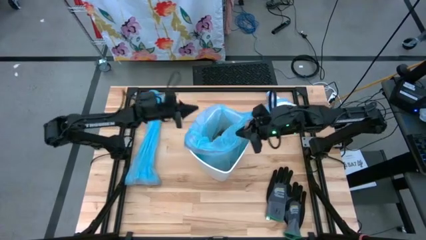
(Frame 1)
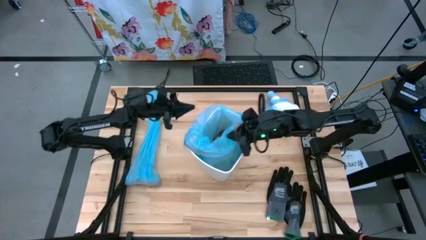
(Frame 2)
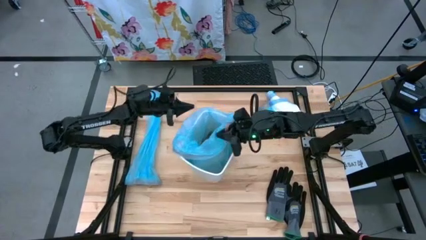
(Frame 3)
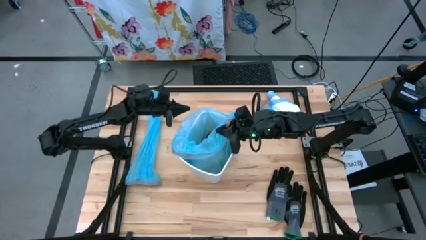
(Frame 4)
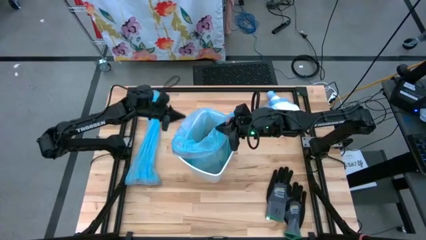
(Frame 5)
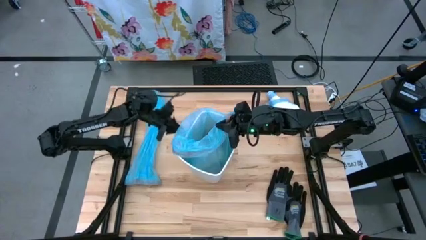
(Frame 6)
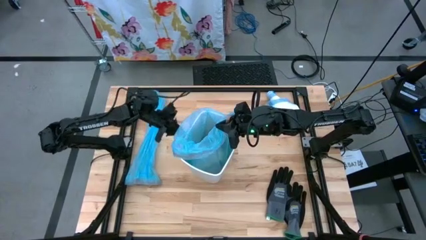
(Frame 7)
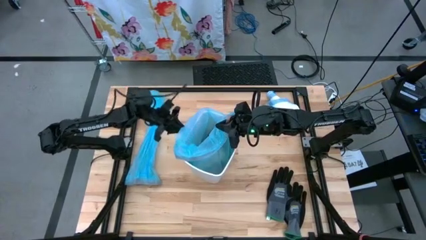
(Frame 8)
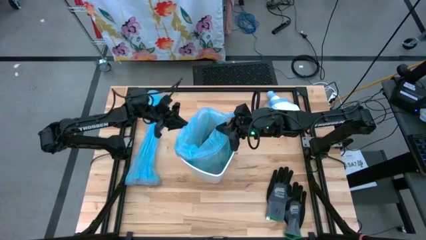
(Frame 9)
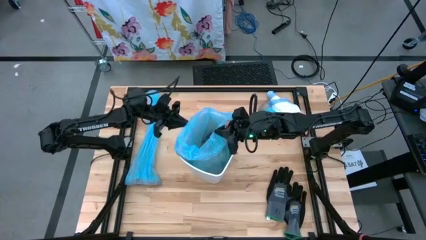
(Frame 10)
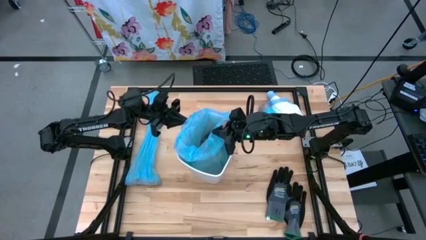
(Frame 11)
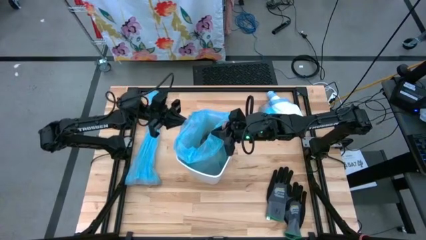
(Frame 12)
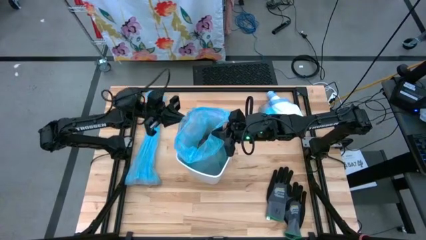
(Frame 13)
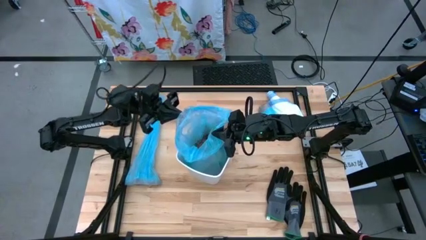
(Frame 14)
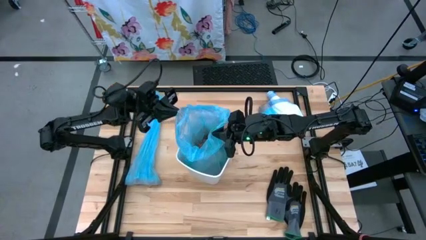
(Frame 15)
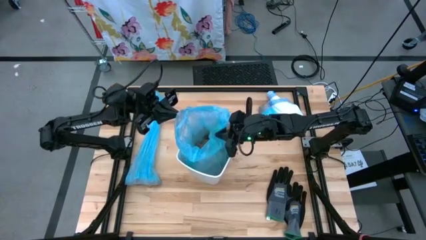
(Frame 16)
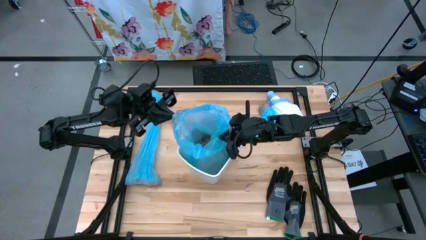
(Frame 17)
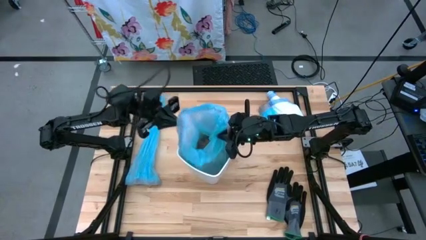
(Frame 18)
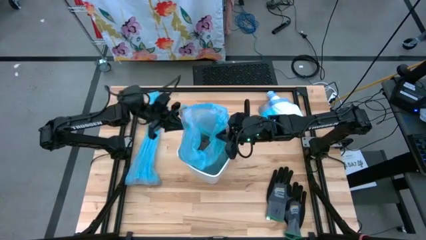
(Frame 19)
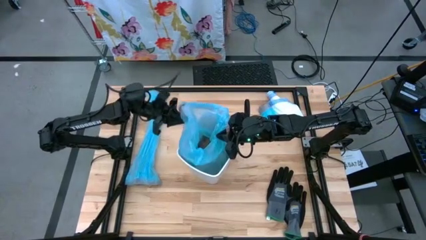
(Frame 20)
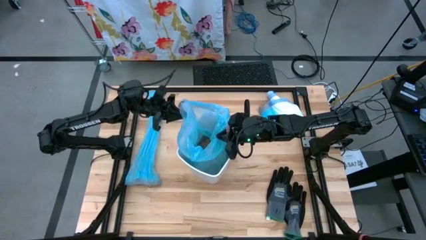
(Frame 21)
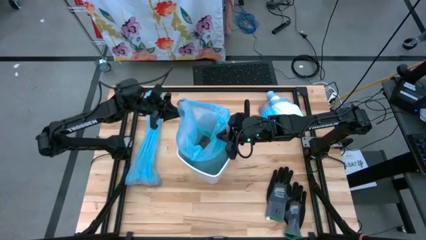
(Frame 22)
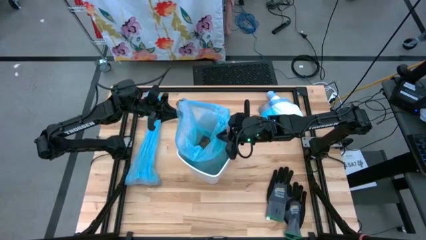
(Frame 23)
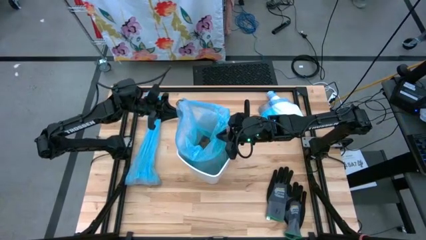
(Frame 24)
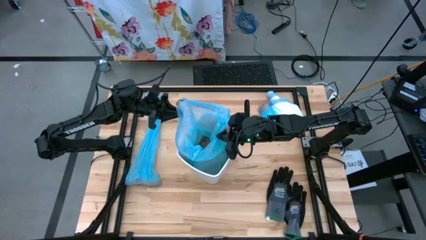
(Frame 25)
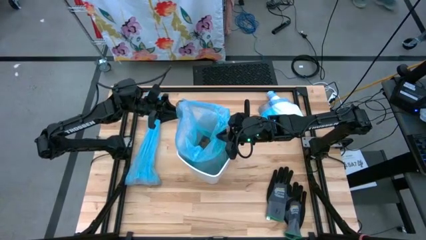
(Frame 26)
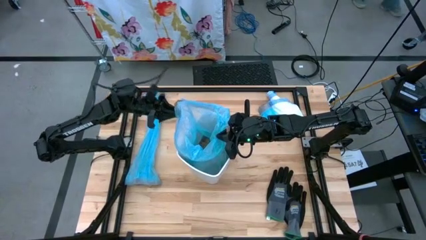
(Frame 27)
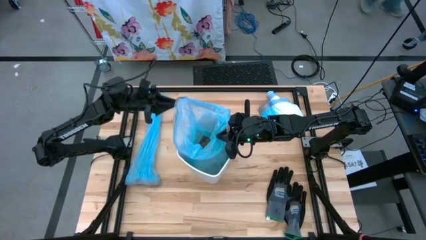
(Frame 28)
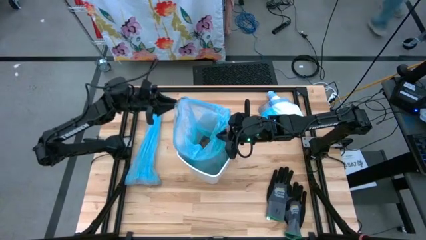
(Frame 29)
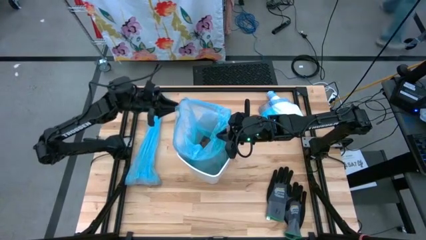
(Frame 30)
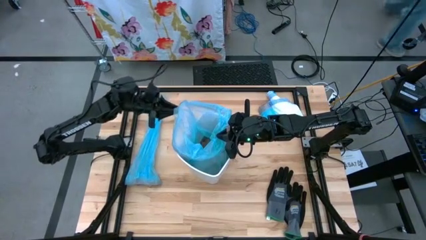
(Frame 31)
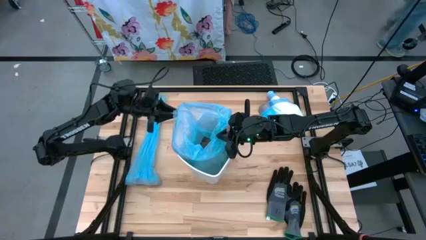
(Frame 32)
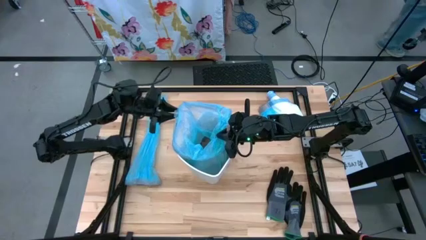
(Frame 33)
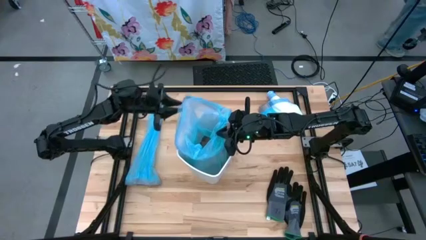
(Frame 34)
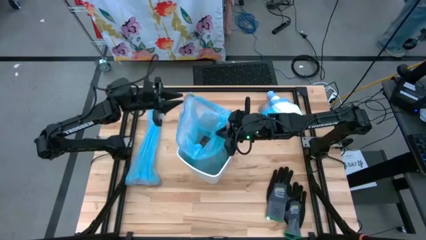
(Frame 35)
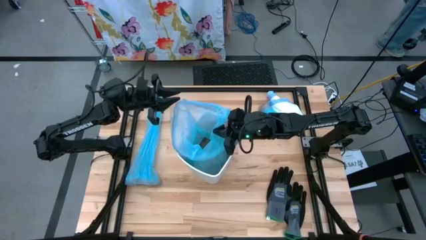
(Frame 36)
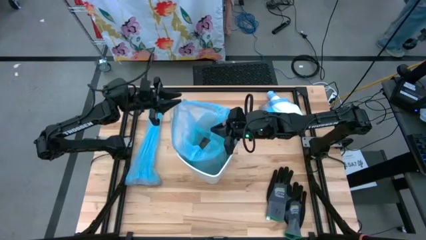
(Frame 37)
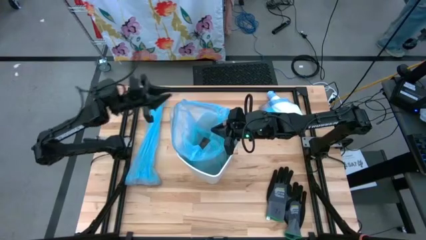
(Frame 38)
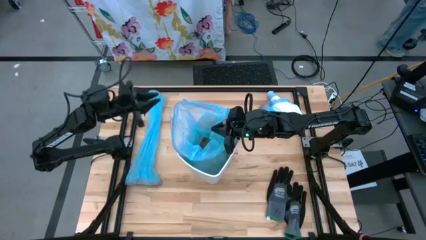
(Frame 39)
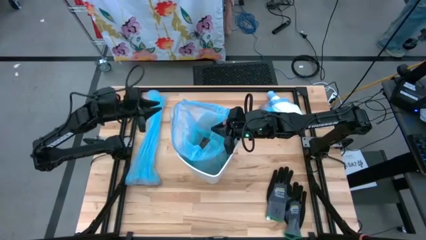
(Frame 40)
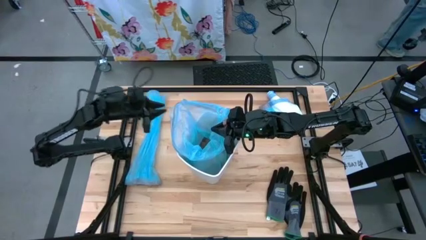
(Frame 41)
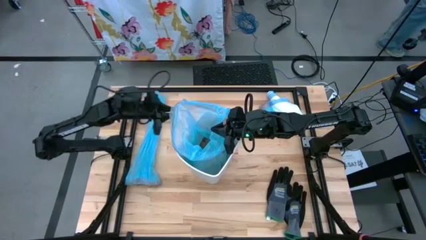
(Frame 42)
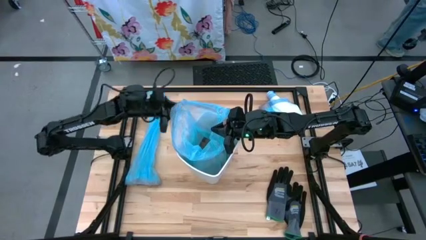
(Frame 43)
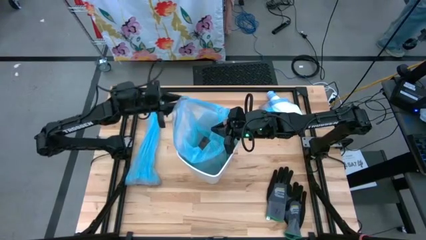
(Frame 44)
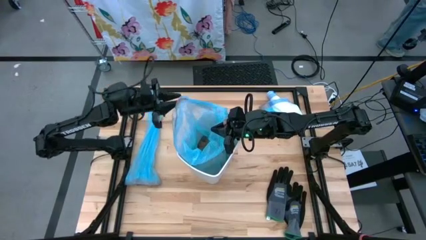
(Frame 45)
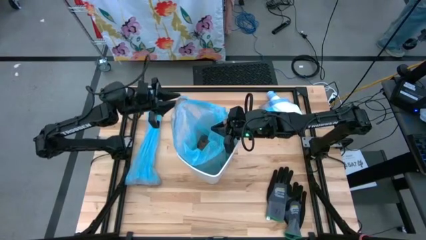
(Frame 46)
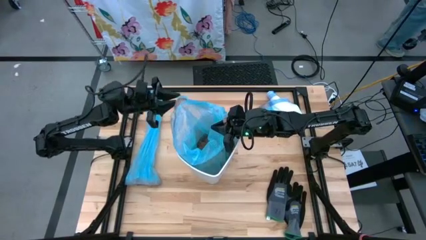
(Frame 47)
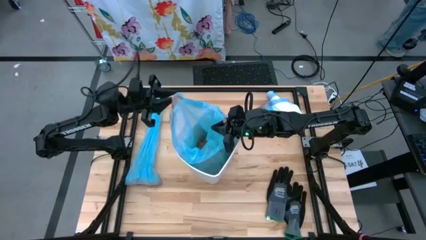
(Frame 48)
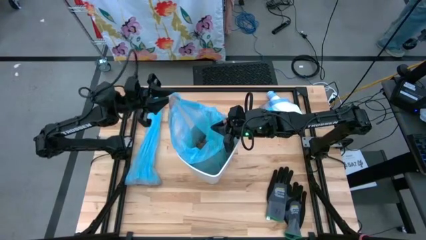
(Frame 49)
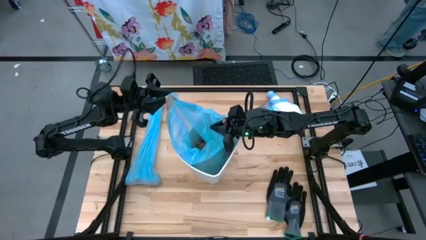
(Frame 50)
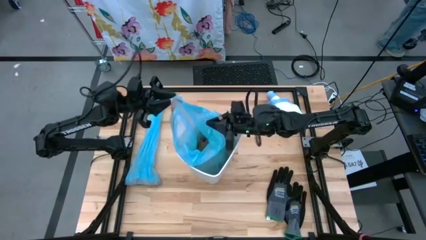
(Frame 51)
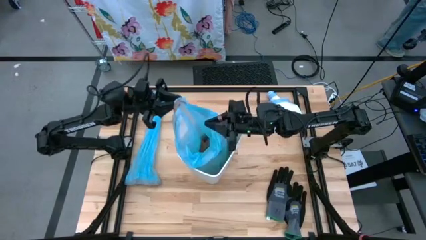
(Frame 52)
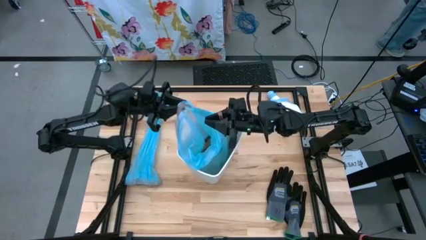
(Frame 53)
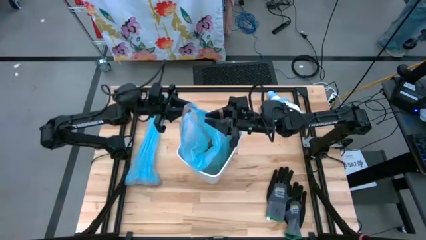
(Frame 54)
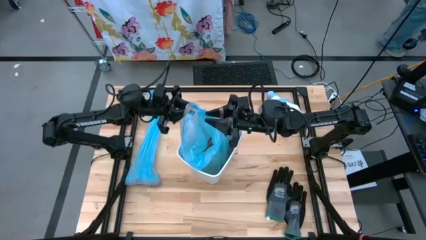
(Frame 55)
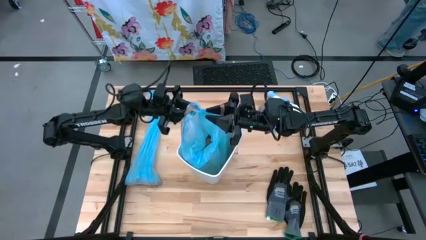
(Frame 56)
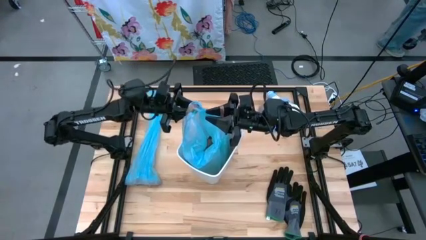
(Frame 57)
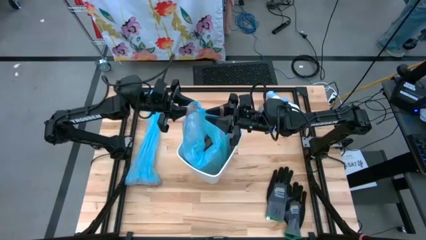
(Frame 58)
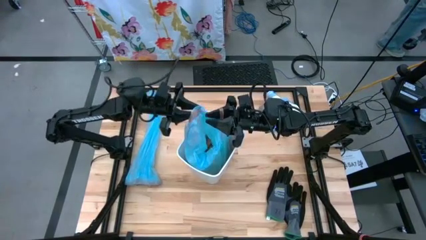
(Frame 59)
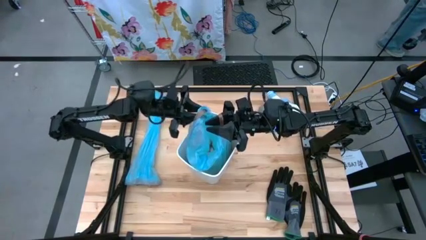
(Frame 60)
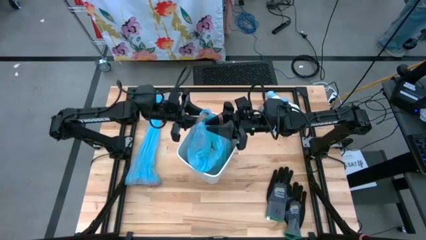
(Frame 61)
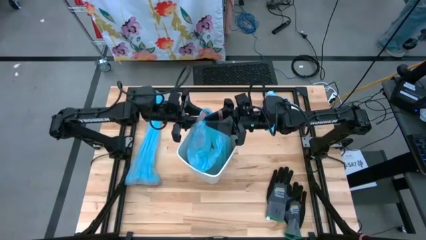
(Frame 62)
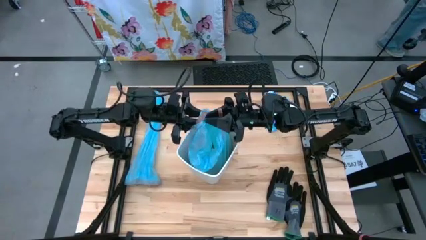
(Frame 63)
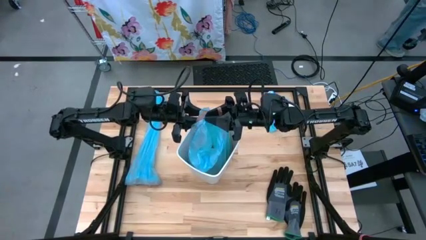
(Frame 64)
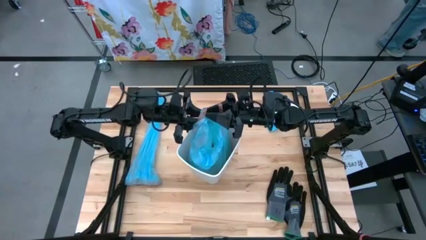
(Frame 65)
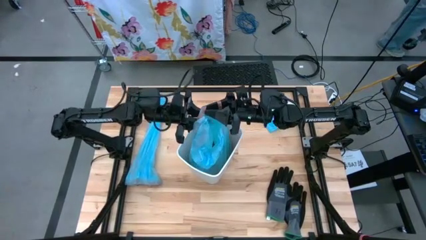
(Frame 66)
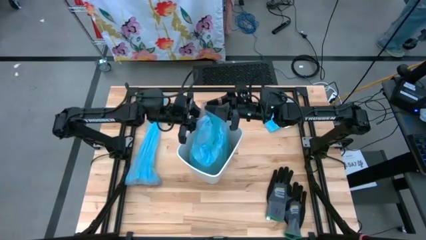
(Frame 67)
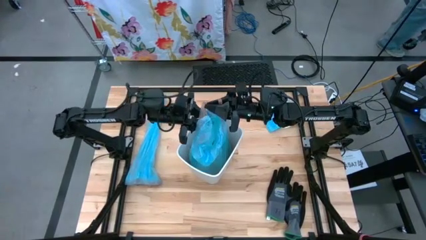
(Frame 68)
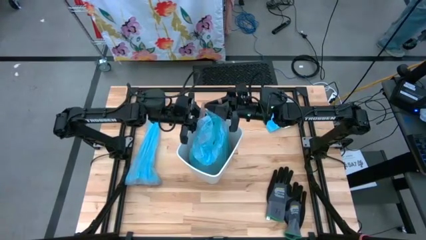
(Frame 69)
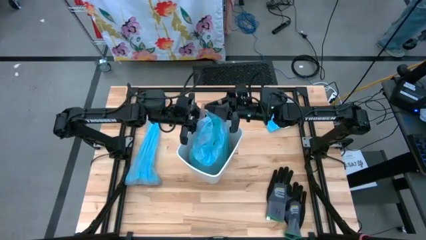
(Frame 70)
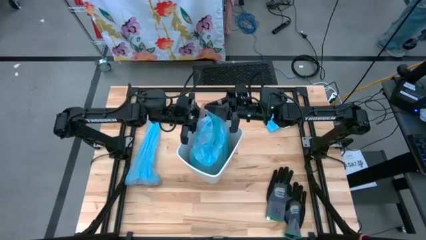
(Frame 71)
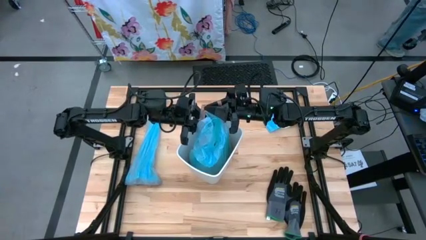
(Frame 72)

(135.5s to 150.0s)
Task: place trash/remove bag and relplace
Remove the blue trash bag from the white trash bin

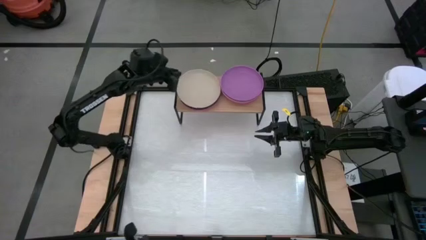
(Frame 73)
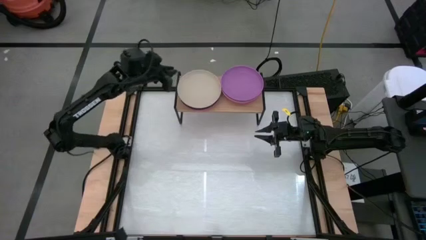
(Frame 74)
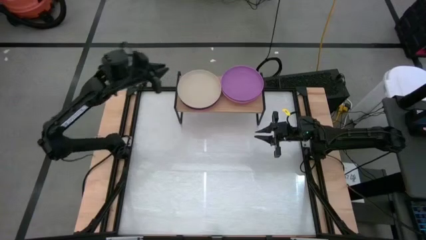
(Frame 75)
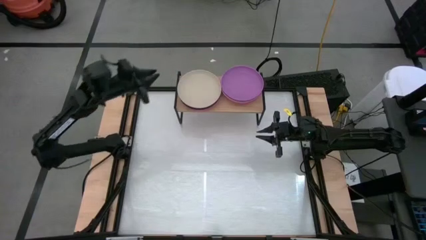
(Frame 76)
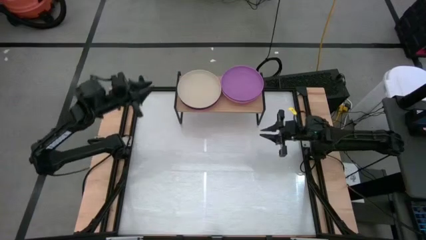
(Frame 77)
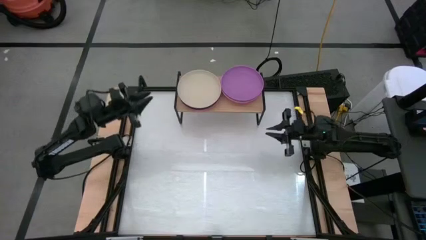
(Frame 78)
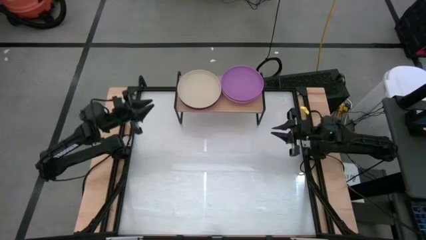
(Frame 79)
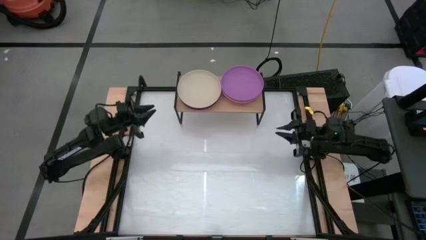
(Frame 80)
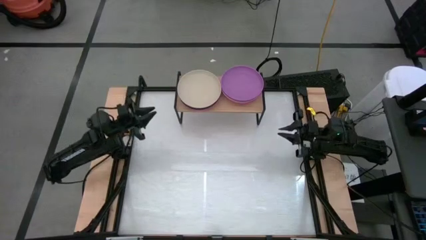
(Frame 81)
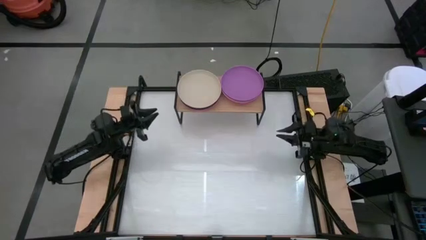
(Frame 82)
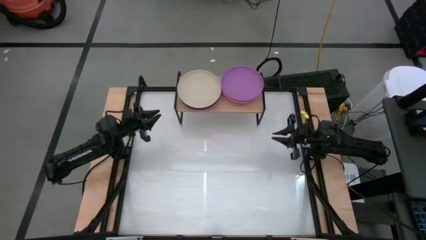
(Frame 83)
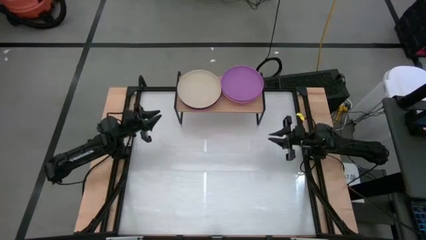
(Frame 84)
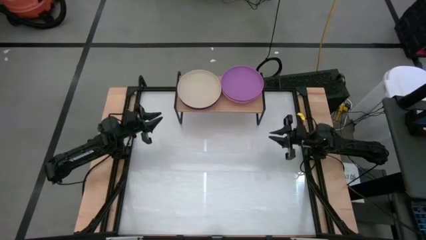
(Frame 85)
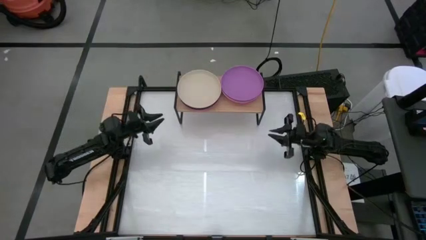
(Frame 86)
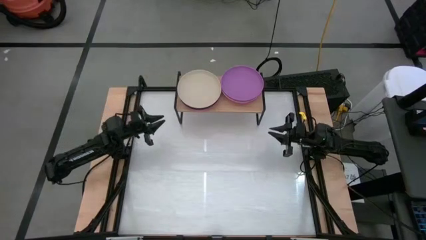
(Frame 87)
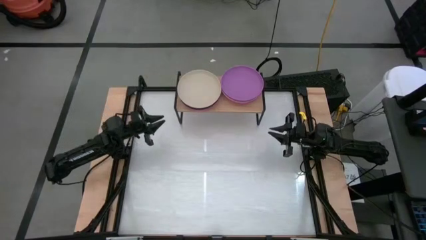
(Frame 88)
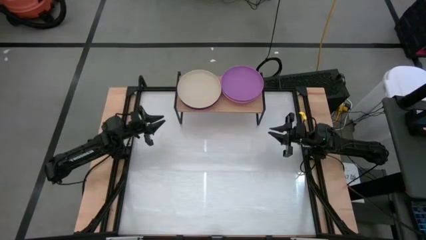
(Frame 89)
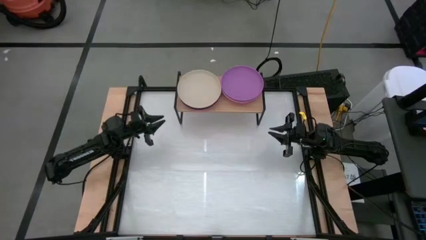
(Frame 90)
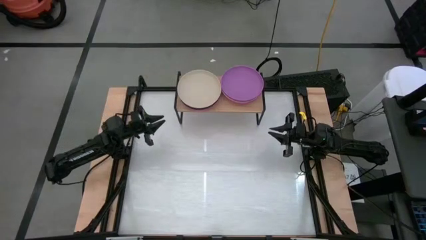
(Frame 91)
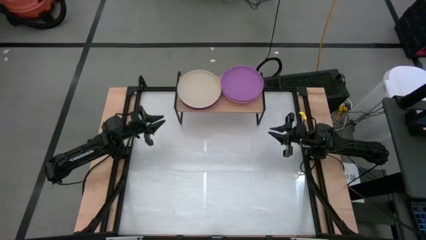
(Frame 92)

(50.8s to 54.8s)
Task: Place and stack plates onto a shelf
Return to Home Position
